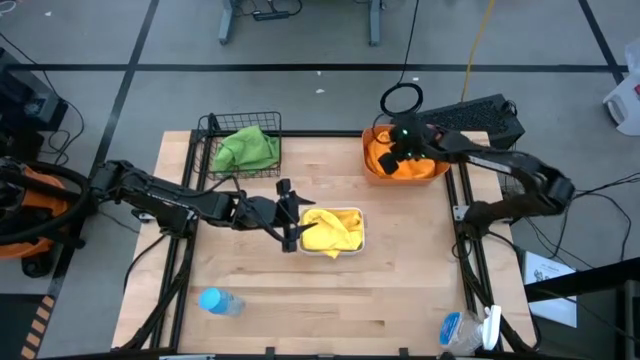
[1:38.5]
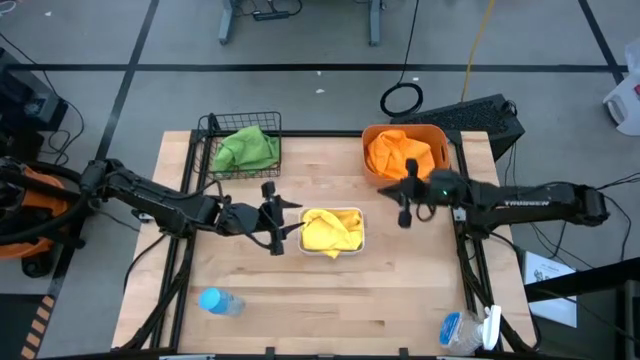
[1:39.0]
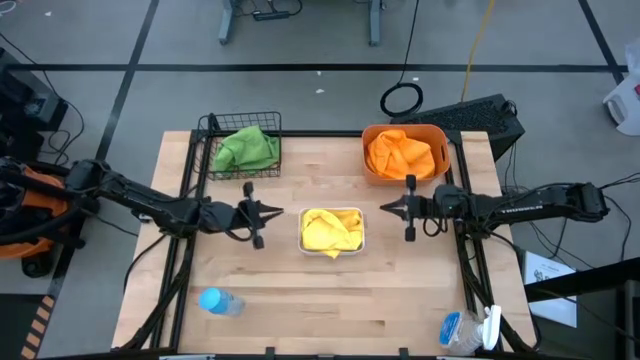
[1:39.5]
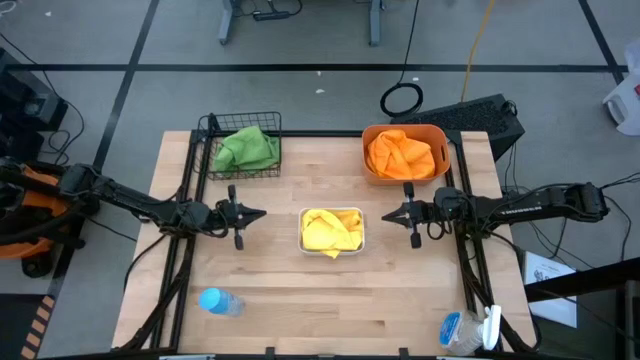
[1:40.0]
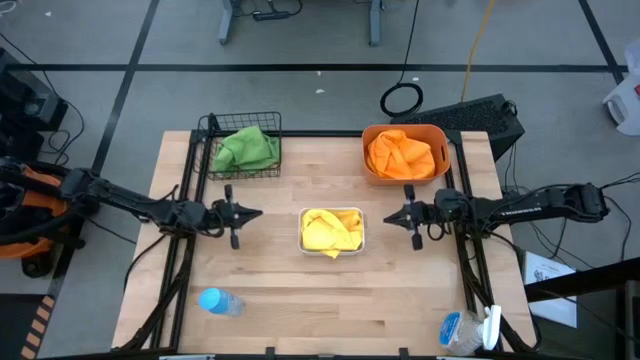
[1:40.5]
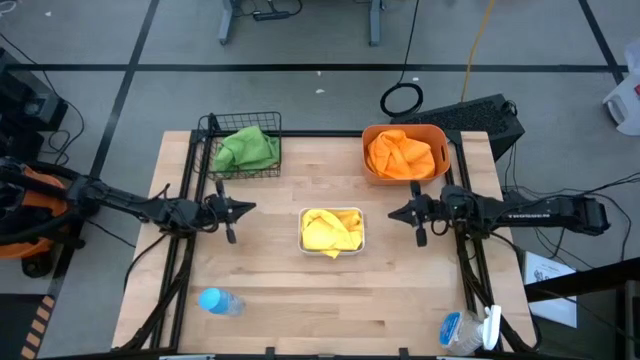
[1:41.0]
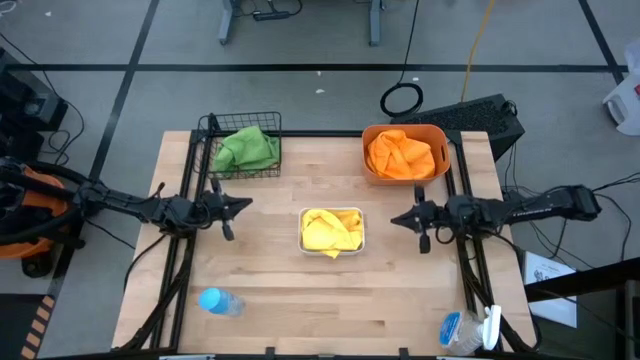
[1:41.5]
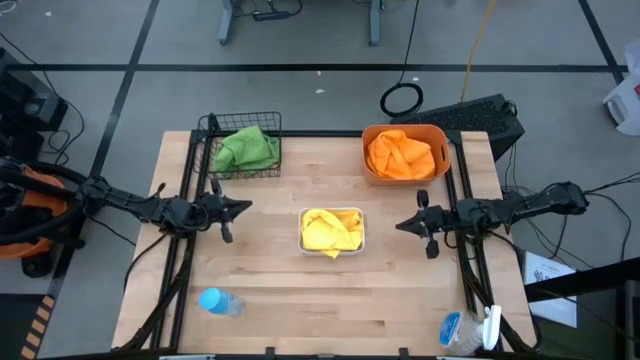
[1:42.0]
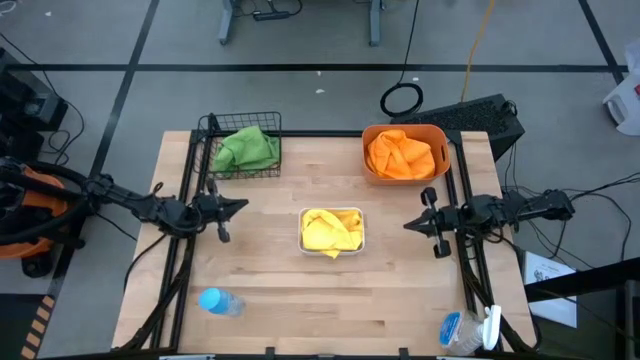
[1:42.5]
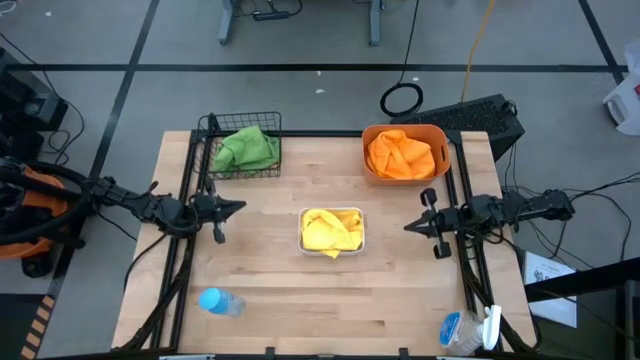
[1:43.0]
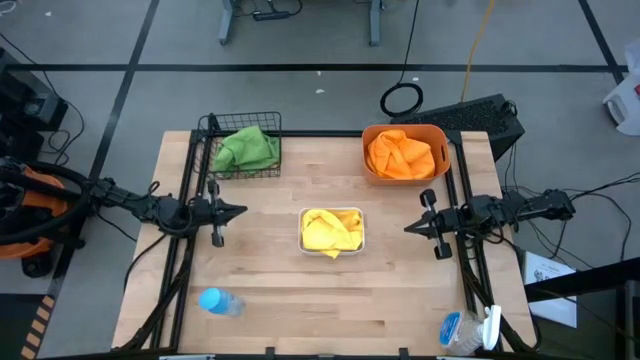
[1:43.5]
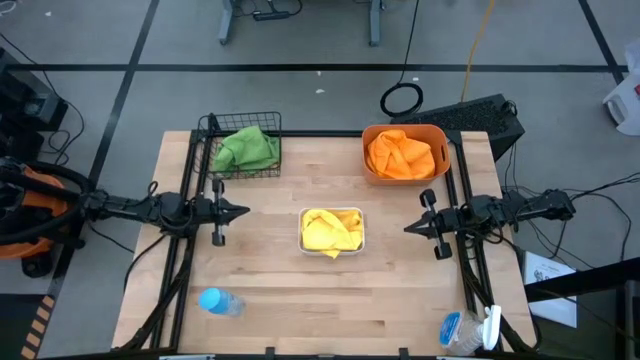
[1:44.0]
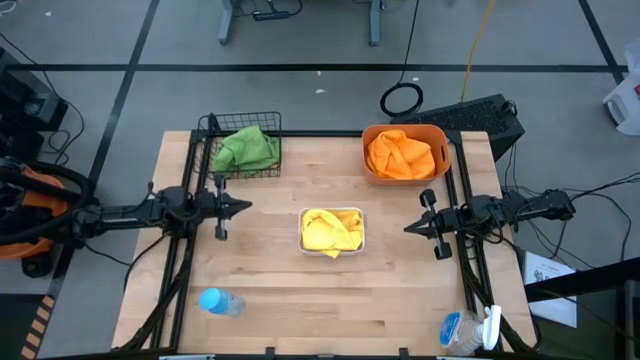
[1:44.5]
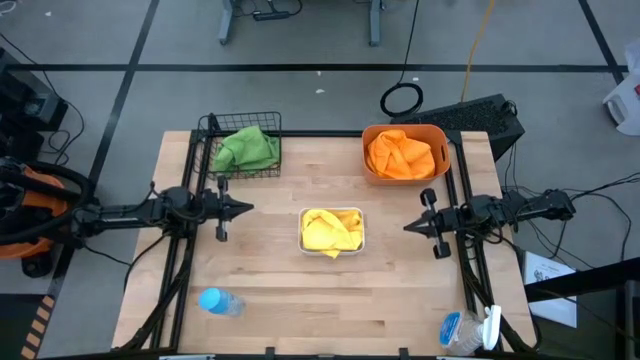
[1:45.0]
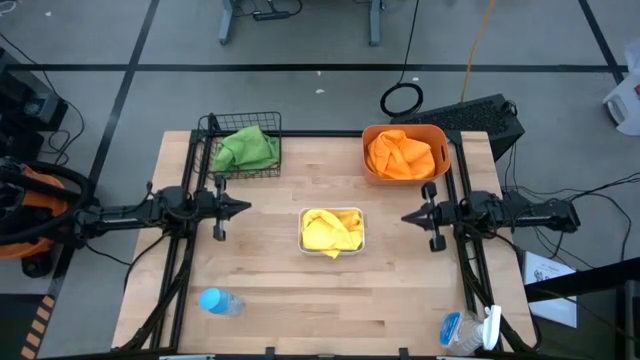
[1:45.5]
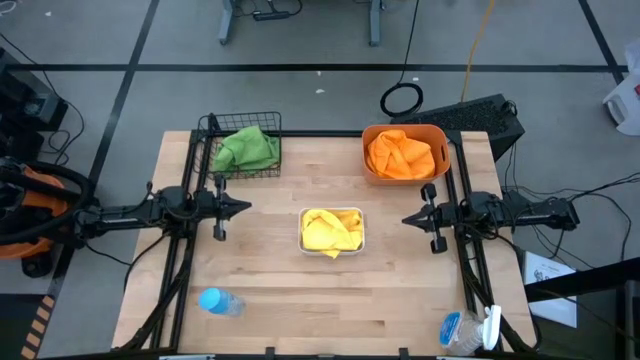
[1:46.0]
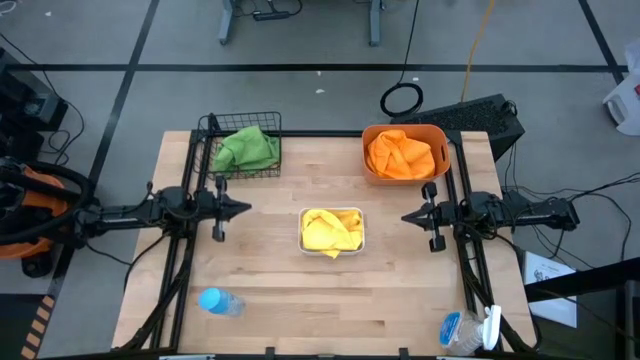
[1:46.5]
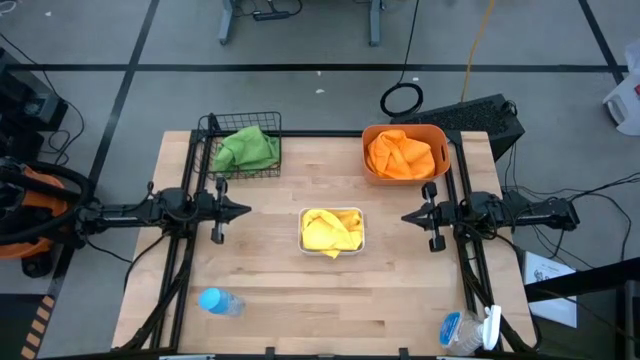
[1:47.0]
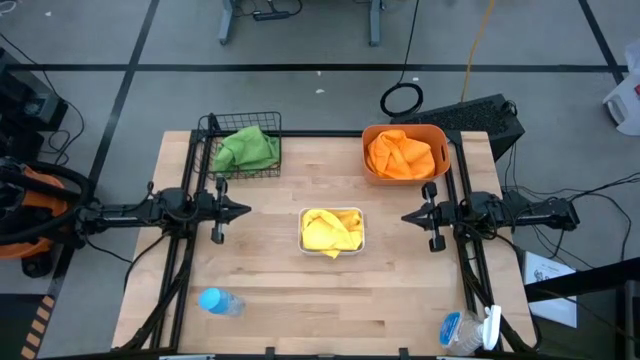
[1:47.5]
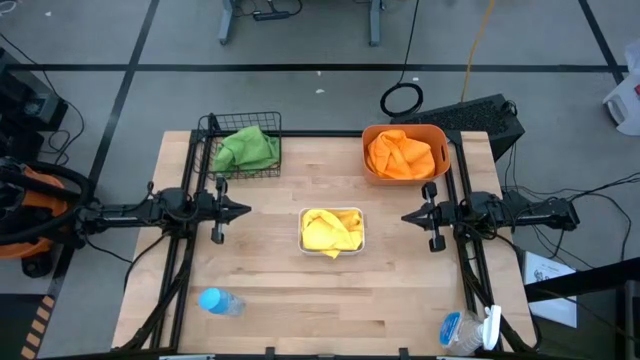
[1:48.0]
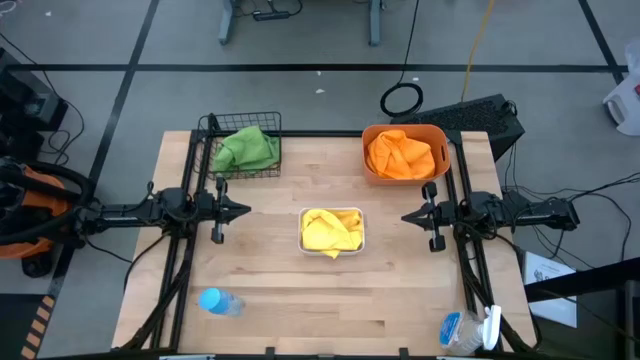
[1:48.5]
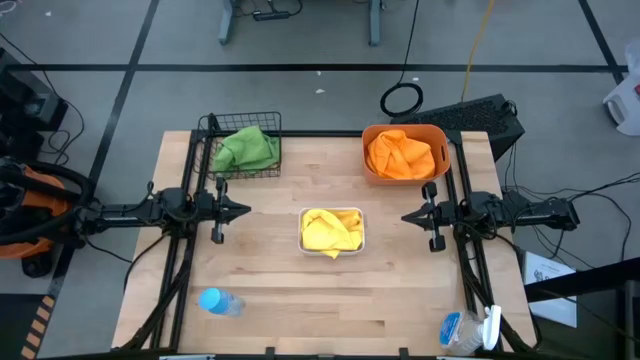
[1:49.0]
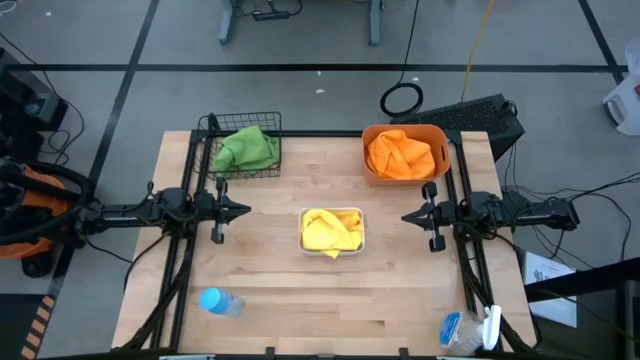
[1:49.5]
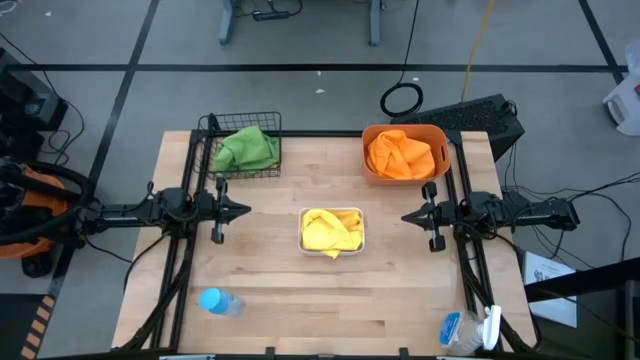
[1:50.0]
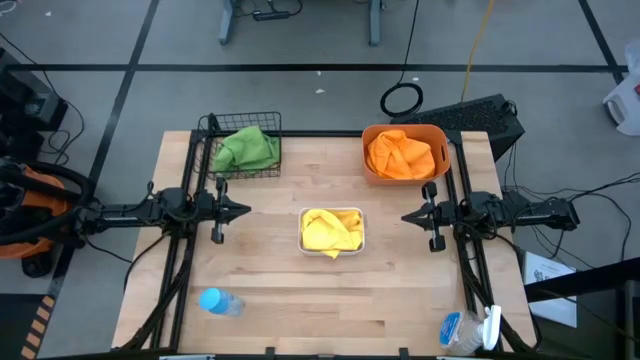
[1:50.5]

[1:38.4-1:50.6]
Task: Sort microfiber towel by color & place in baskets
Return to Home Position

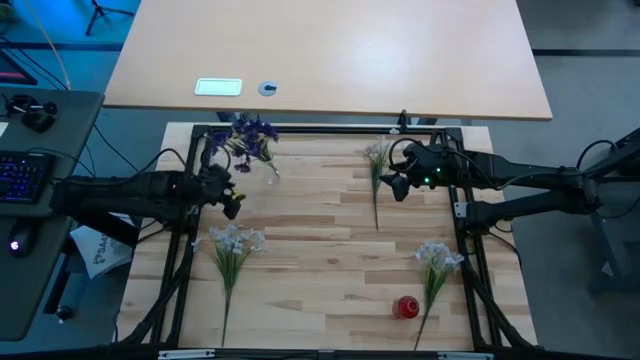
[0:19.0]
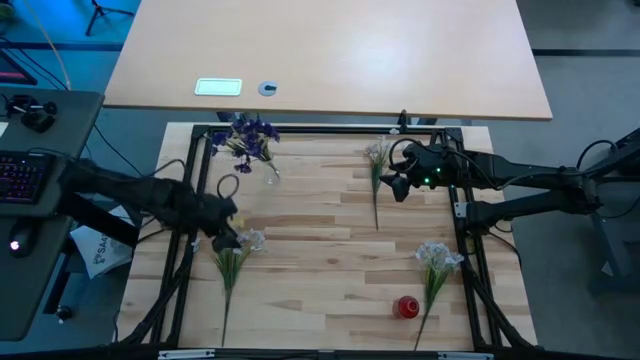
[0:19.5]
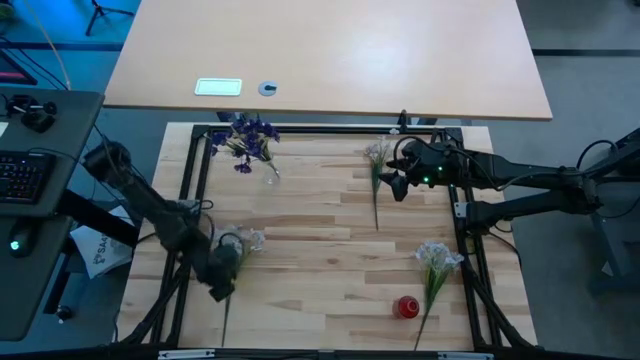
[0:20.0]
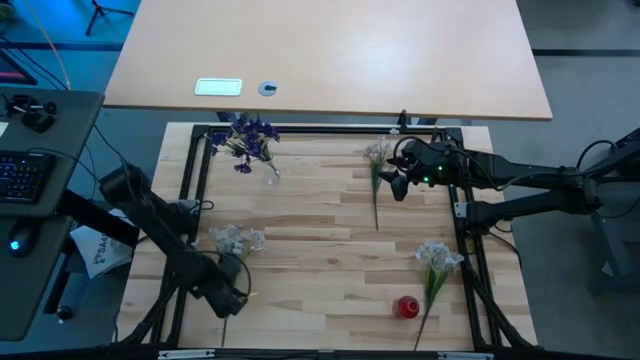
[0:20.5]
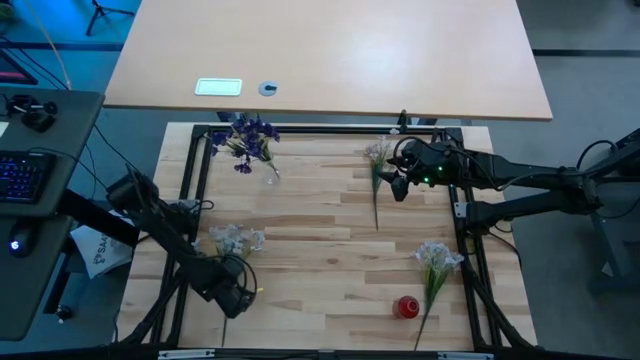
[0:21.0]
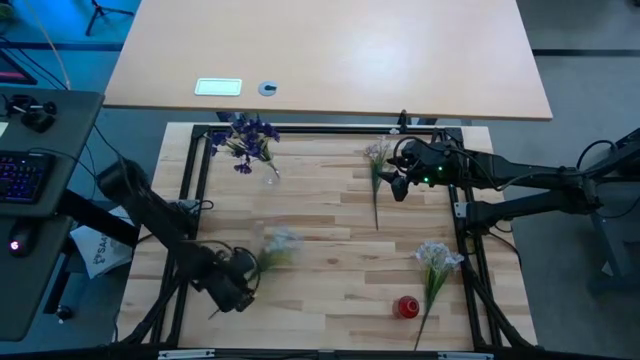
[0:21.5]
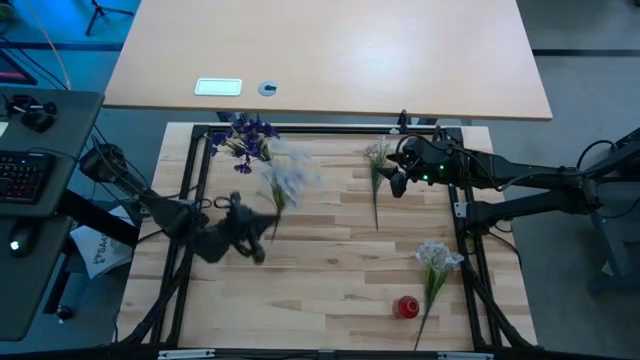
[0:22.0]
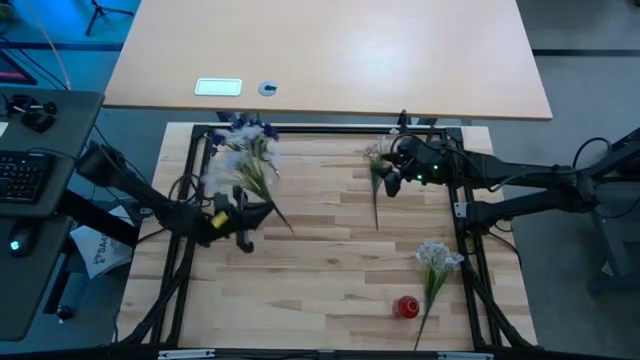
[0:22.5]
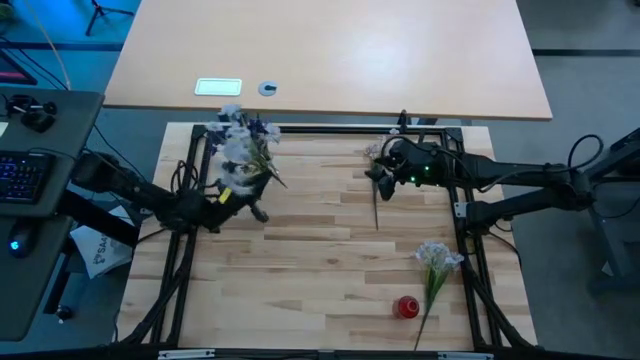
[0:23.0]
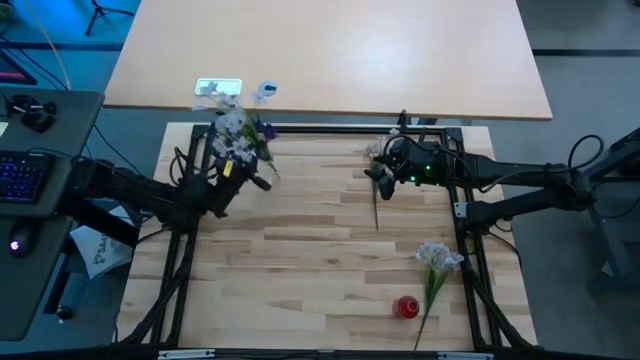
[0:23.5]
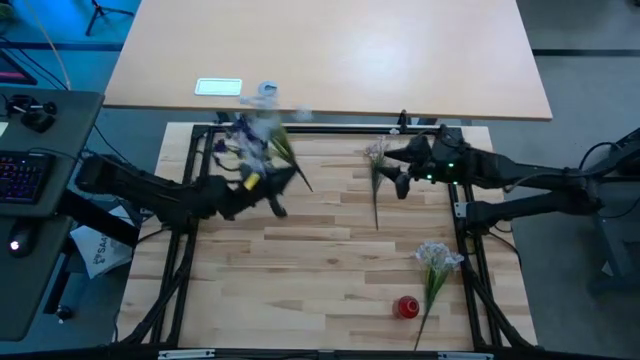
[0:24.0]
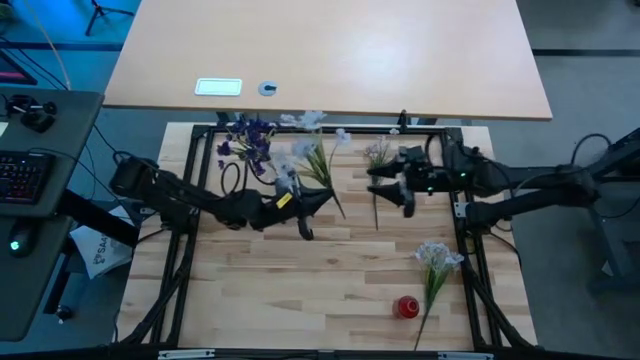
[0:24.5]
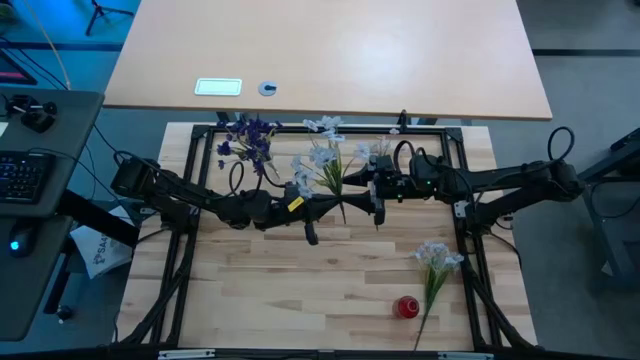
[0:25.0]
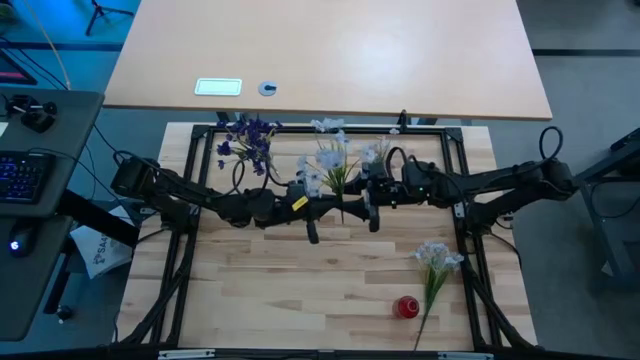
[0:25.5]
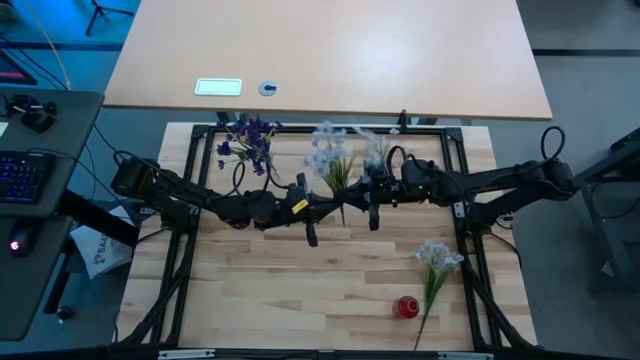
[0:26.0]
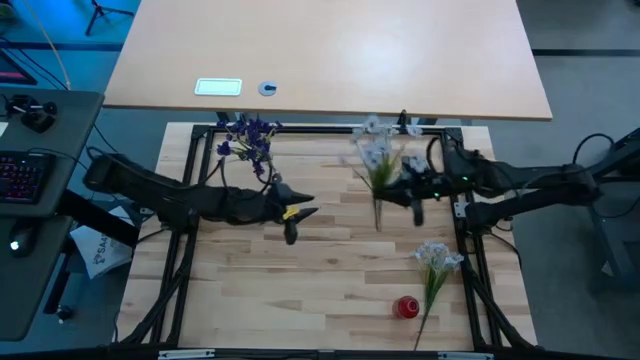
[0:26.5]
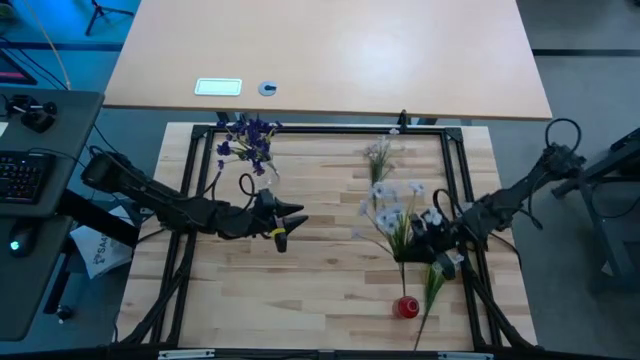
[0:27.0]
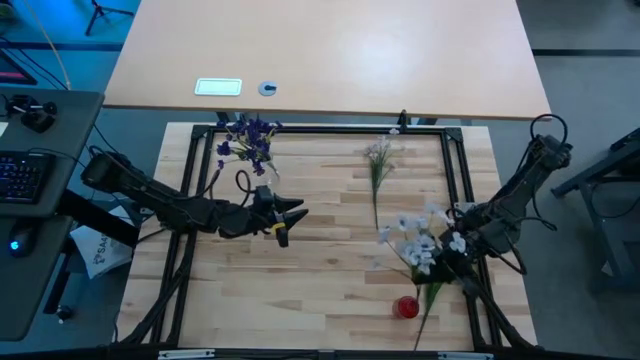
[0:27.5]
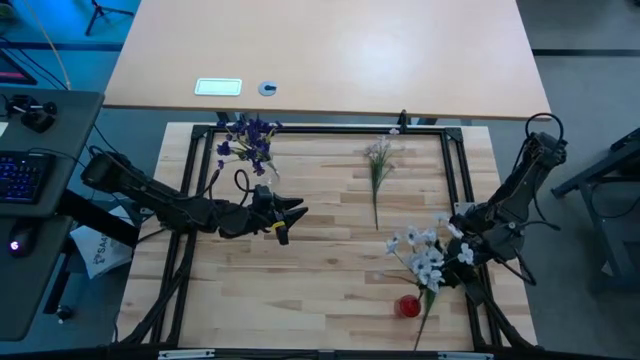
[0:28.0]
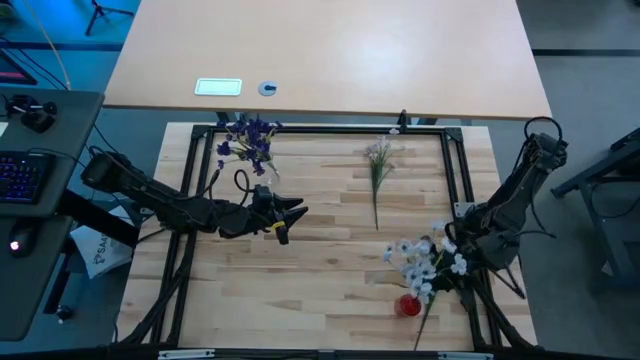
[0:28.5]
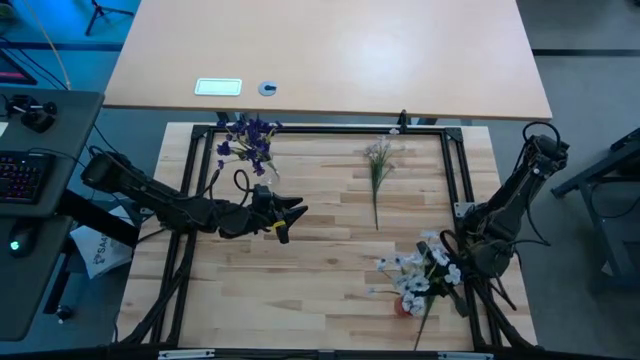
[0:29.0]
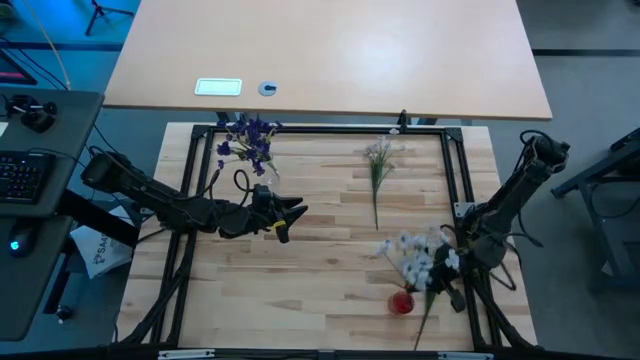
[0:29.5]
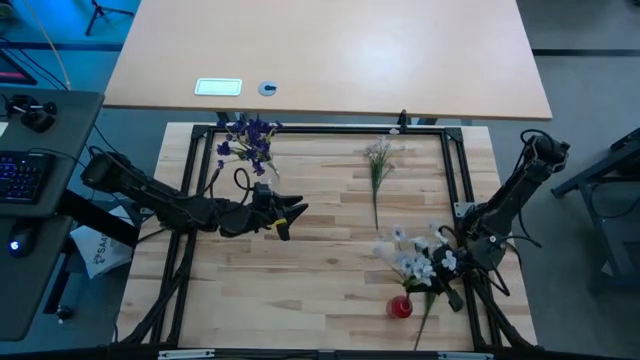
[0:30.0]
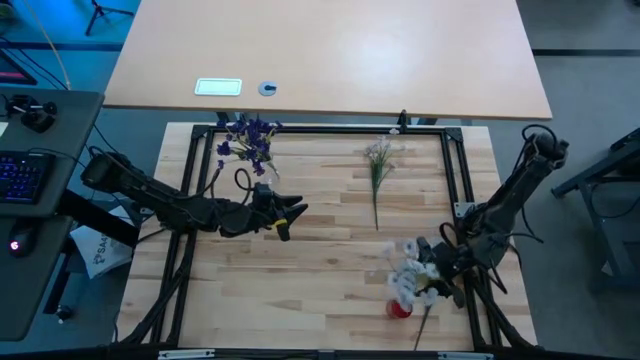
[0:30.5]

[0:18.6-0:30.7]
Task: Sort flowers into vase by color
Put the bottom left white flowers into the red vase
